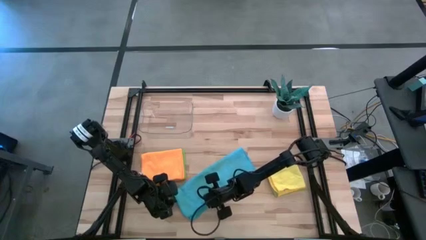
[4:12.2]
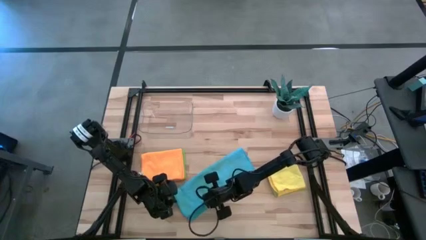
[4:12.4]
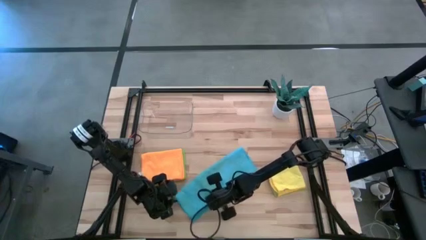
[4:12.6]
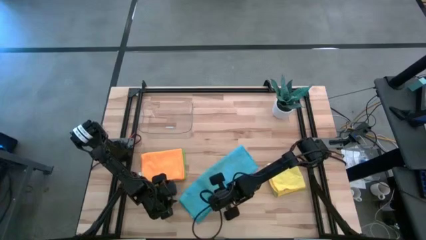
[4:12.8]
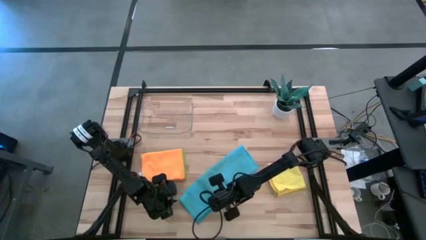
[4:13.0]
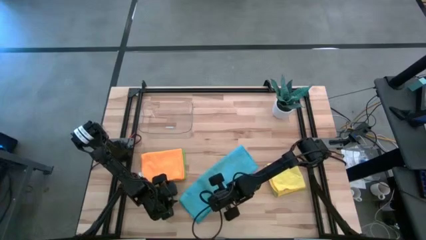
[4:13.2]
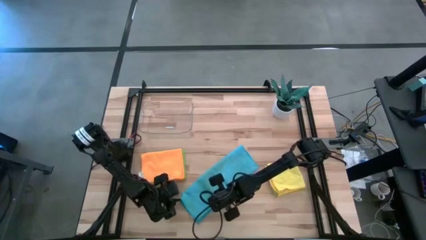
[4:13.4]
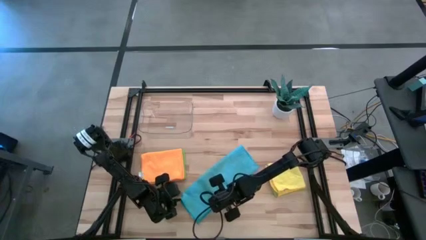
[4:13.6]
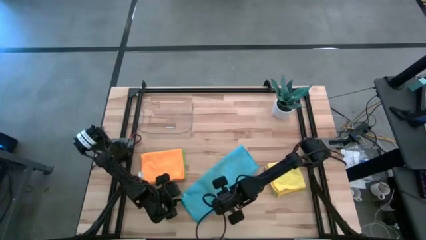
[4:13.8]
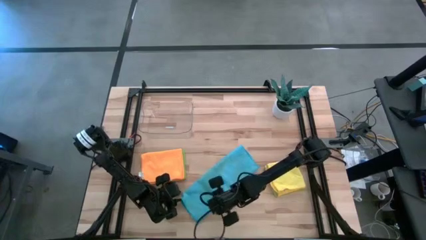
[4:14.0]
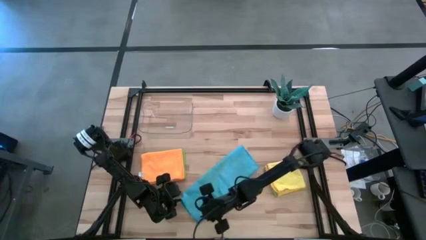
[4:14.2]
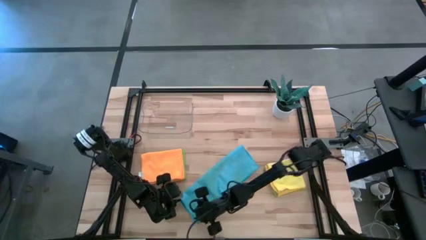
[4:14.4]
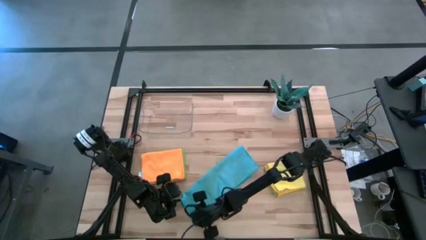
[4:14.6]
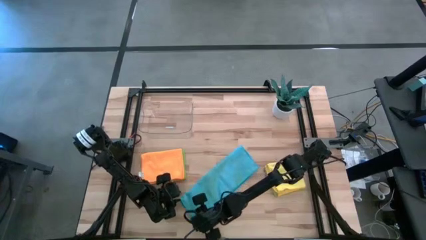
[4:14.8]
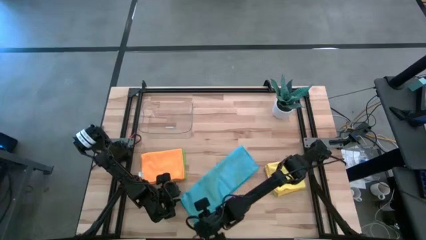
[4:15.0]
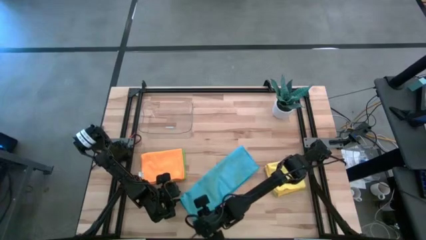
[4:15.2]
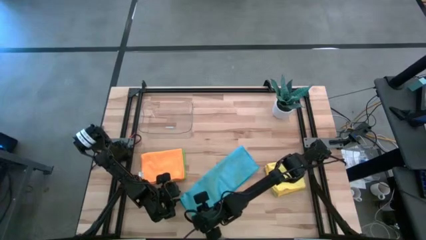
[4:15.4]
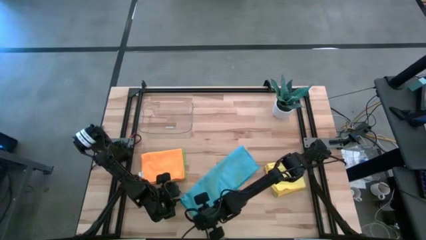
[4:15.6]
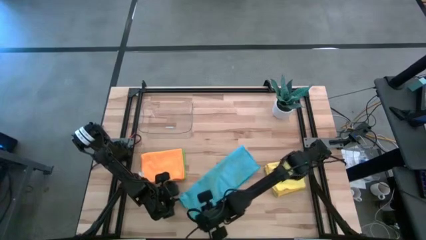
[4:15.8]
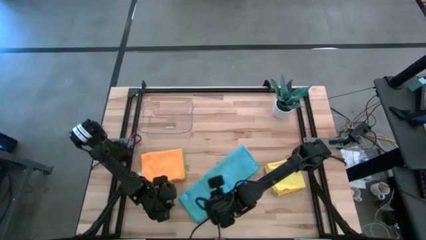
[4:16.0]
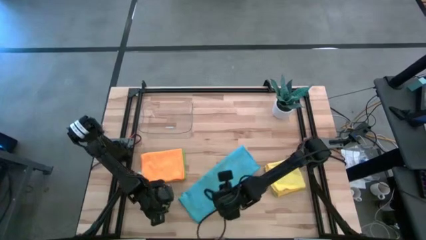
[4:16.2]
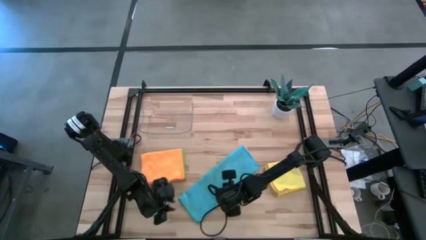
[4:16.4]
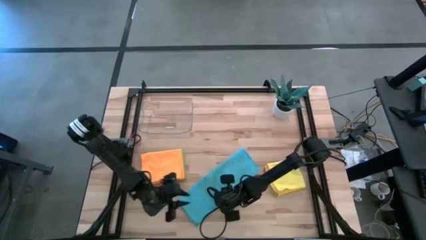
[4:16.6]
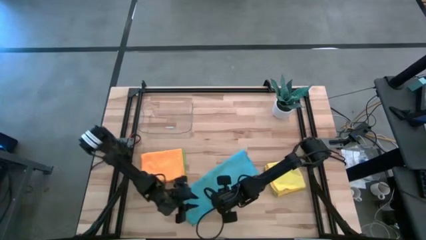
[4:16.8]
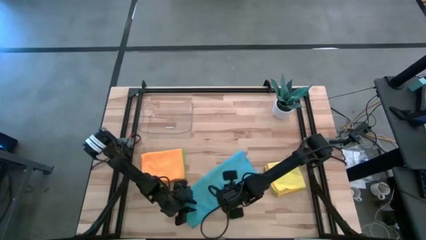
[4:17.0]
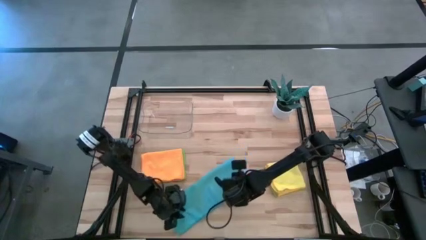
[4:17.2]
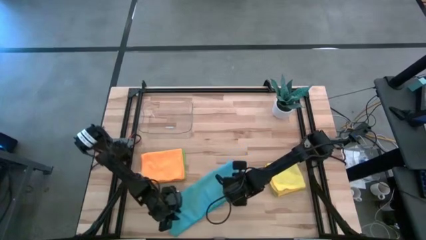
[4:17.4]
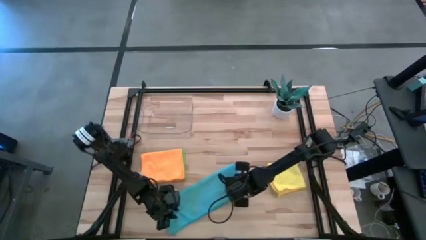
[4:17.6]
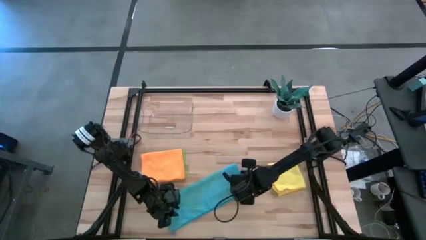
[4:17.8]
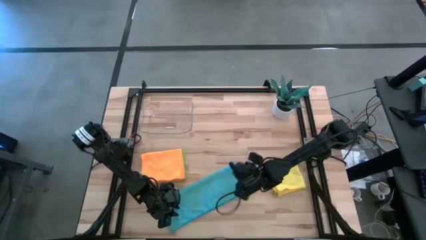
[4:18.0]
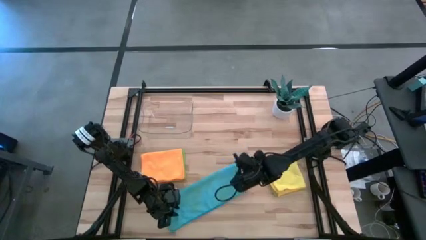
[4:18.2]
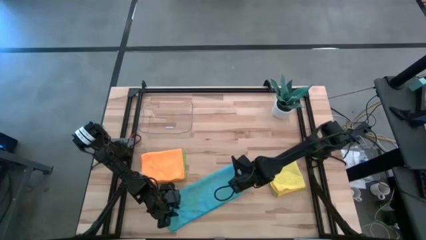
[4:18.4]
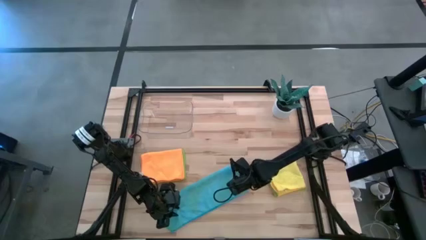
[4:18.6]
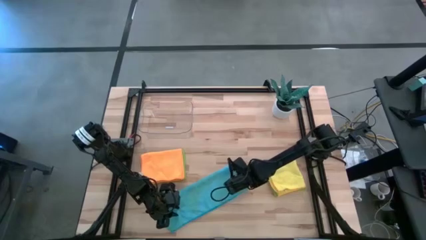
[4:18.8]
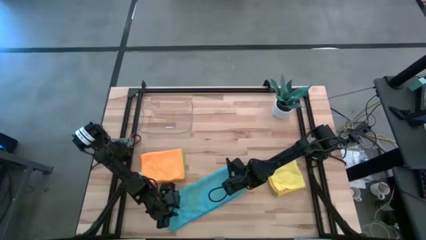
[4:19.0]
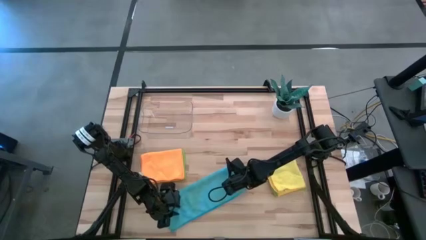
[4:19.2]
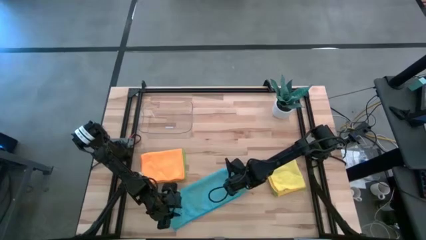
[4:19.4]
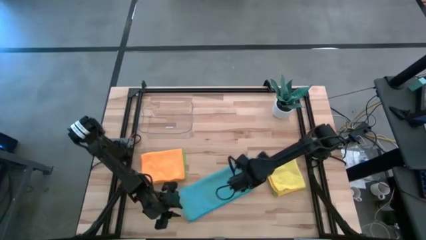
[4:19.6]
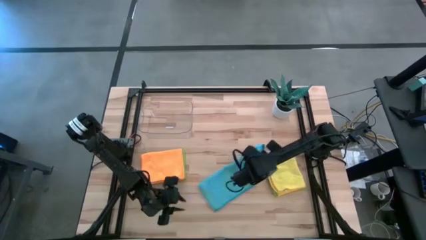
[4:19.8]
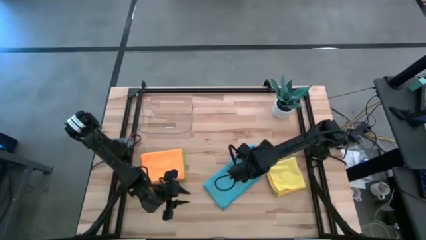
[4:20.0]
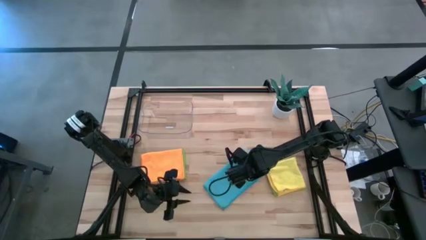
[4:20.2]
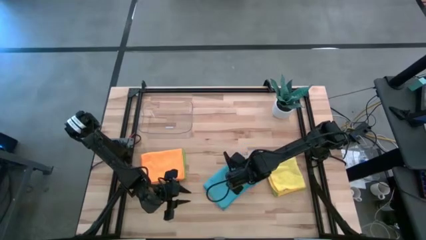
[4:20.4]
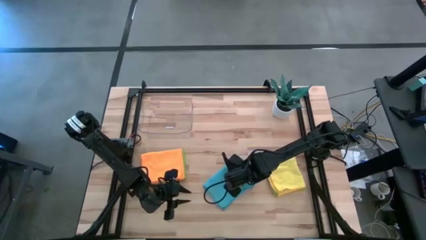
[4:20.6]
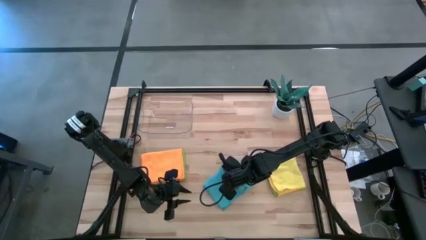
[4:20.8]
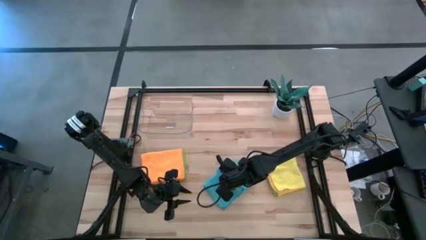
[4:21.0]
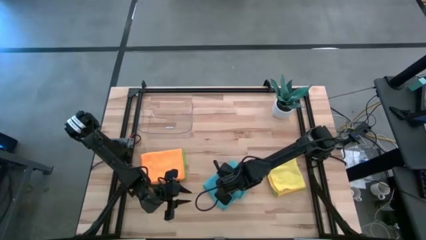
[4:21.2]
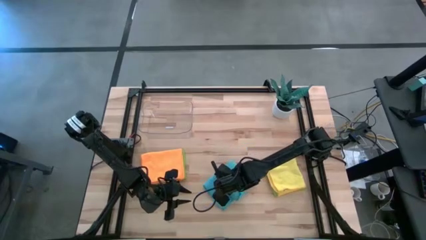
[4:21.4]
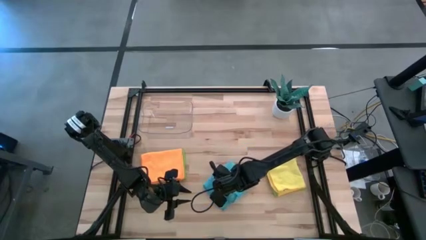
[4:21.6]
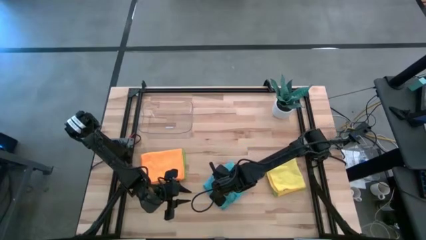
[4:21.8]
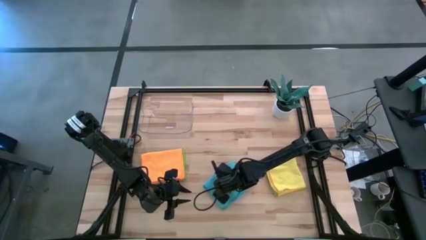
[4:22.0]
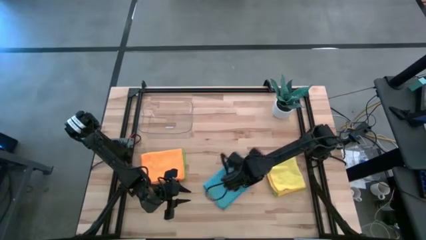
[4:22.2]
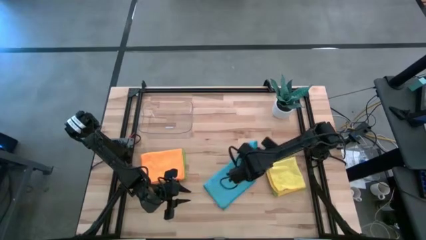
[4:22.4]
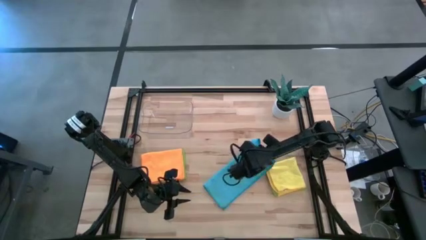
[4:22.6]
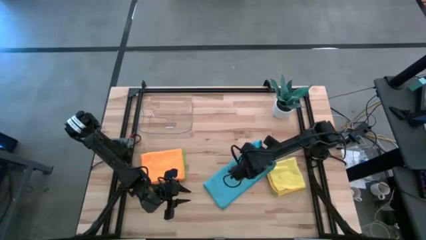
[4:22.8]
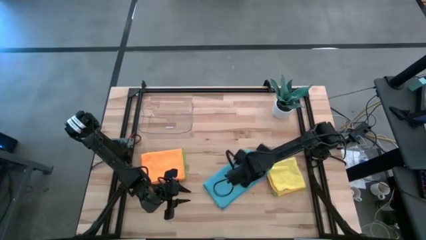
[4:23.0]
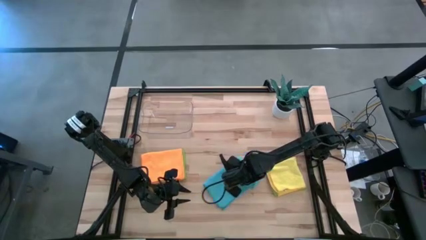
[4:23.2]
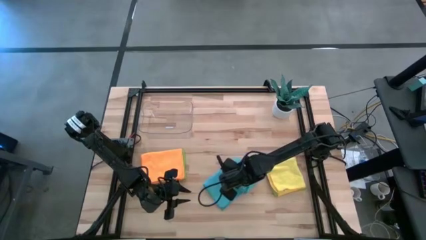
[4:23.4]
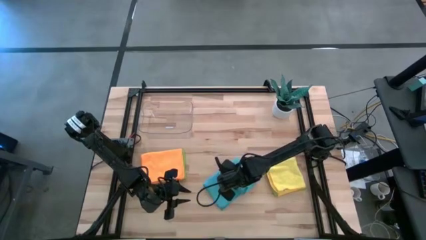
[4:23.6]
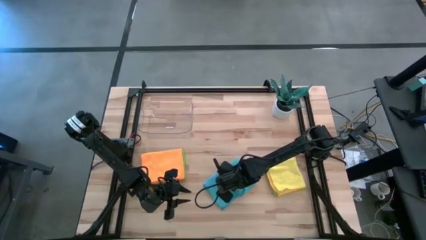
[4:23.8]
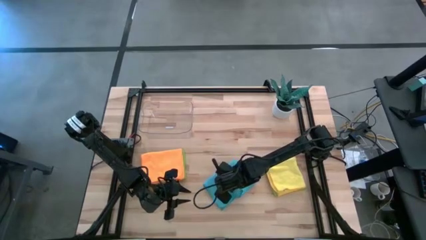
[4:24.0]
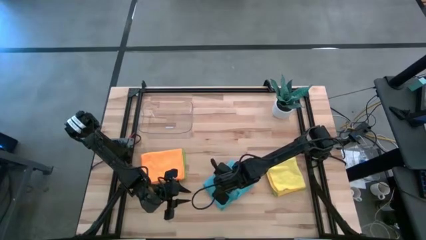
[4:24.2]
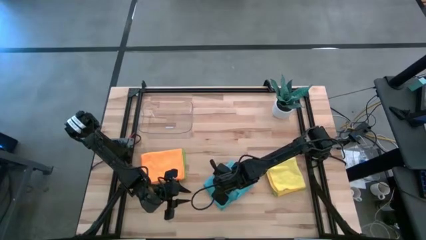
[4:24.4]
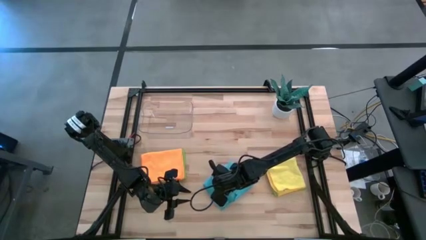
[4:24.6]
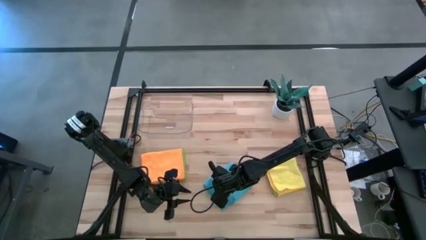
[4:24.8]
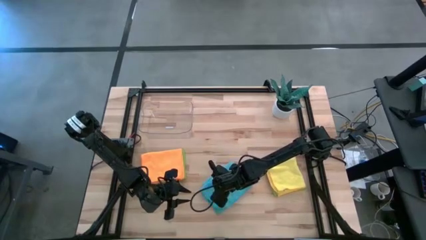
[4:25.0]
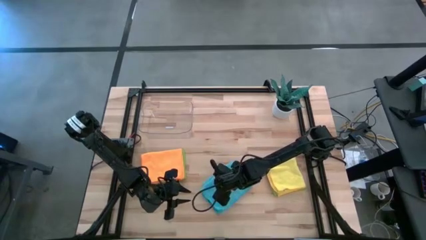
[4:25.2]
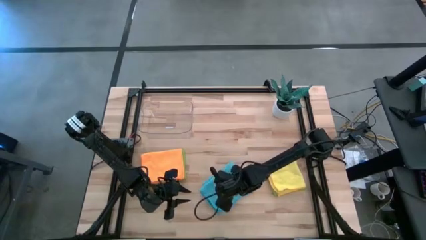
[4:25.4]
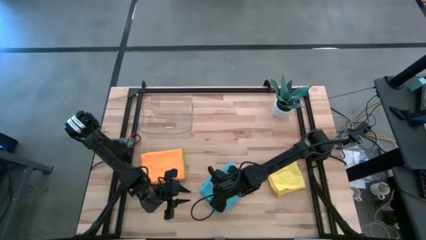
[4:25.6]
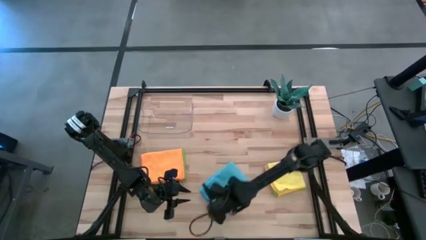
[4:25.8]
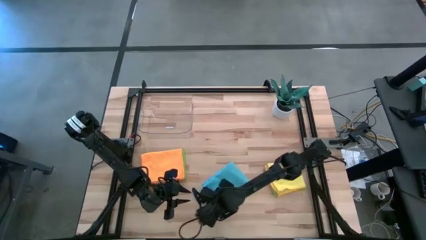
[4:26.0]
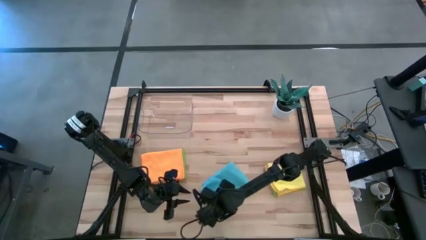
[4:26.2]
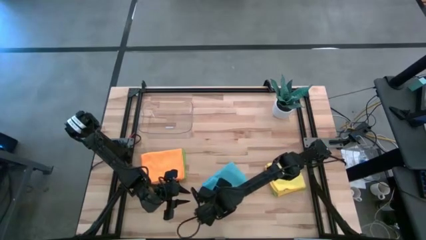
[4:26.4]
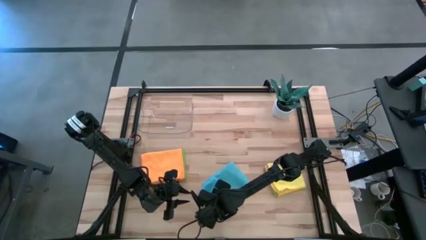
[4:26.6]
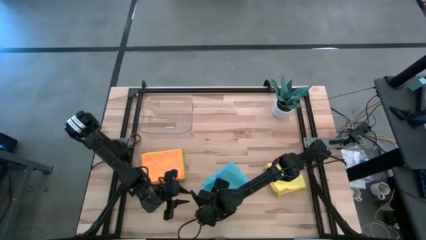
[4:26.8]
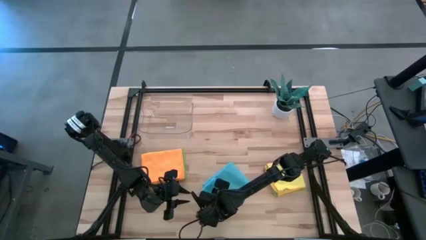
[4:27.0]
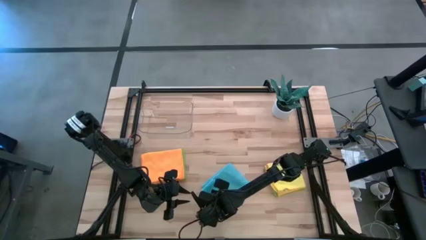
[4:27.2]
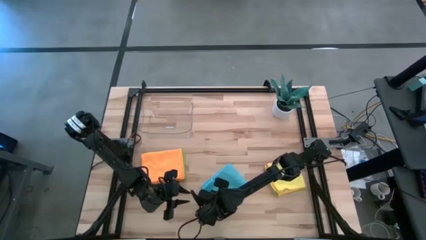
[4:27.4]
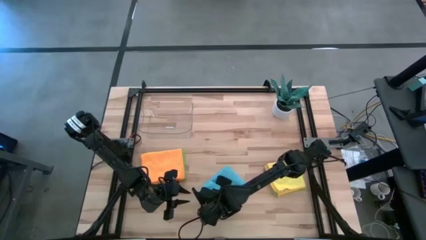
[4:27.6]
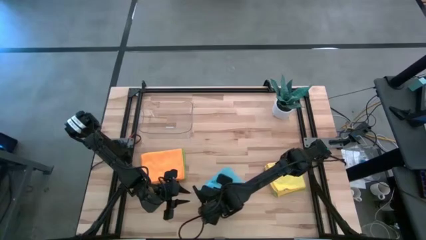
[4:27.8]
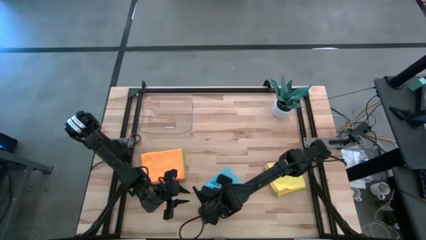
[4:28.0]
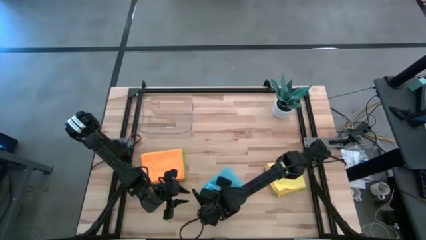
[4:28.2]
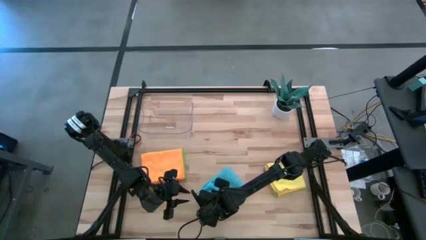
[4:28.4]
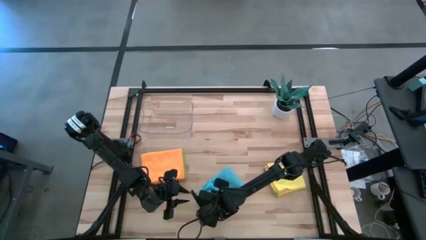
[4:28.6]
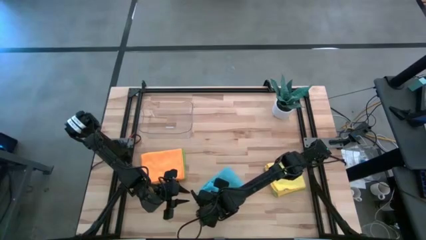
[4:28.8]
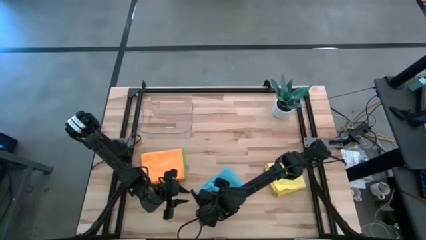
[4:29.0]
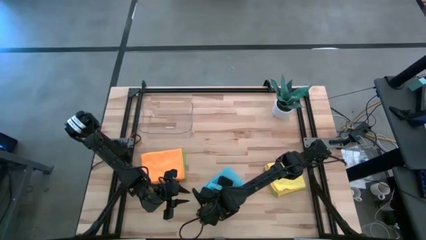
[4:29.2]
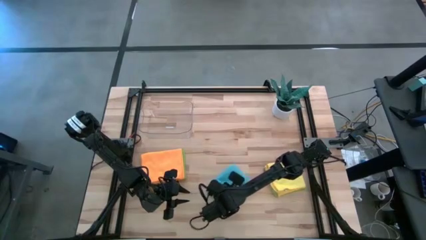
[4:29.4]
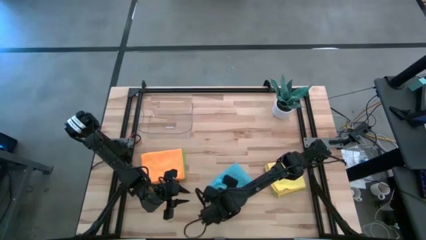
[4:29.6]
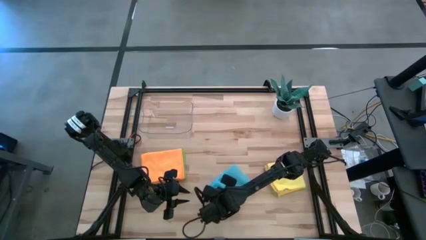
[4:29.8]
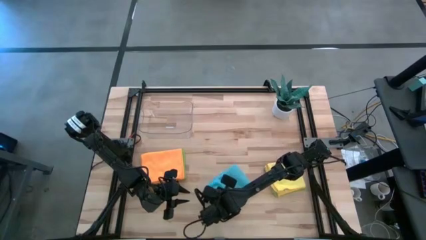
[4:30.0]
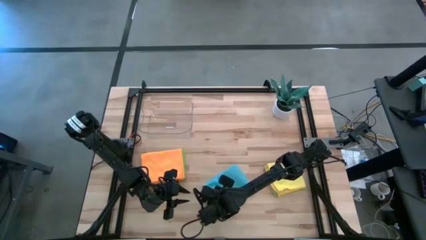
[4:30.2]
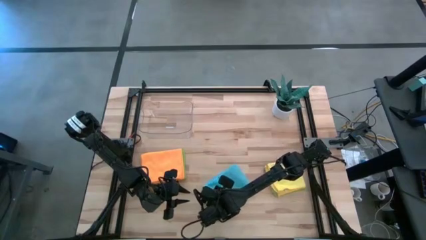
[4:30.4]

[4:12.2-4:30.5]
Task: Fold microfiber towels
Fold the blue microfiber cloth
